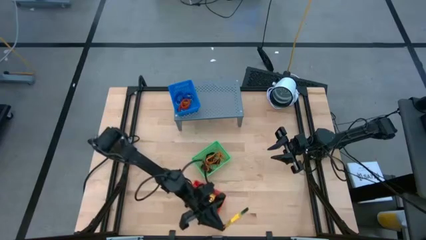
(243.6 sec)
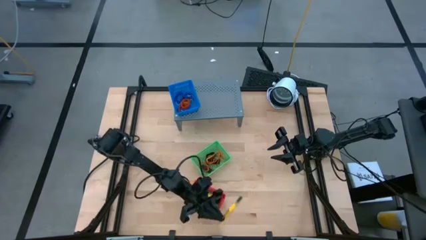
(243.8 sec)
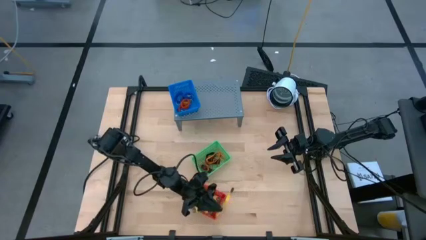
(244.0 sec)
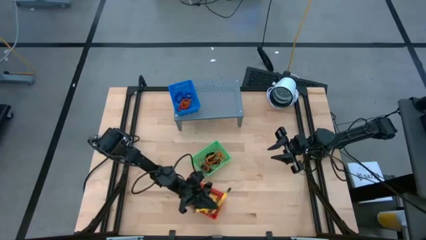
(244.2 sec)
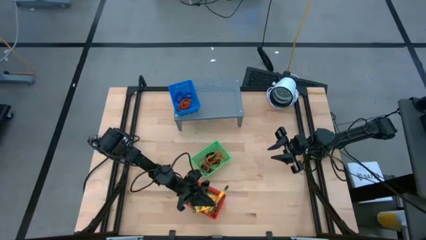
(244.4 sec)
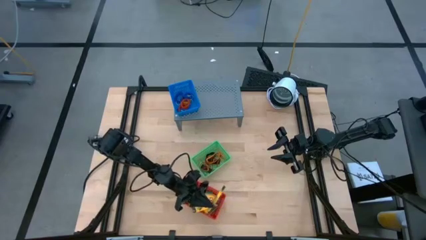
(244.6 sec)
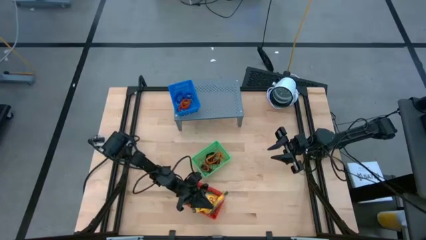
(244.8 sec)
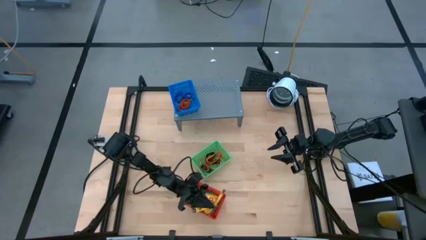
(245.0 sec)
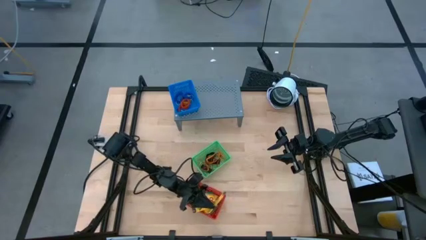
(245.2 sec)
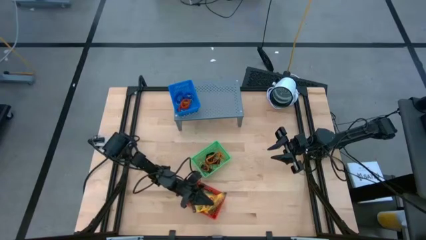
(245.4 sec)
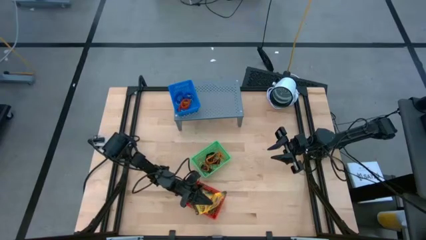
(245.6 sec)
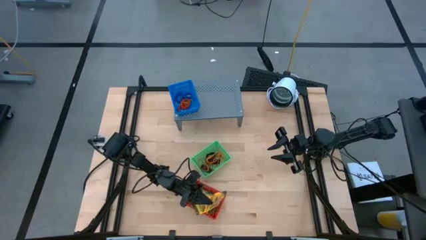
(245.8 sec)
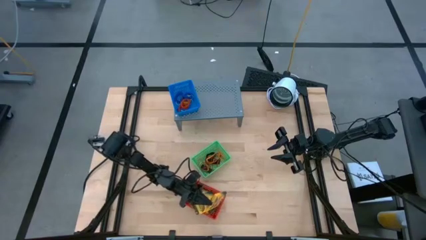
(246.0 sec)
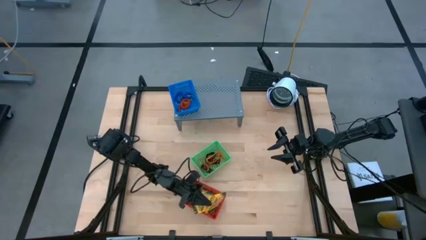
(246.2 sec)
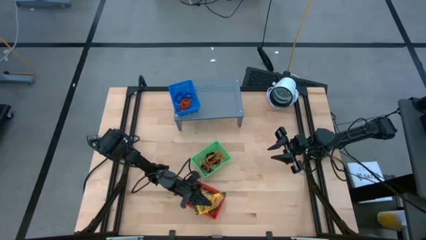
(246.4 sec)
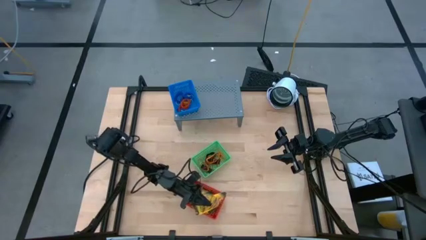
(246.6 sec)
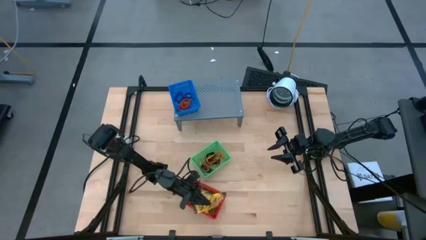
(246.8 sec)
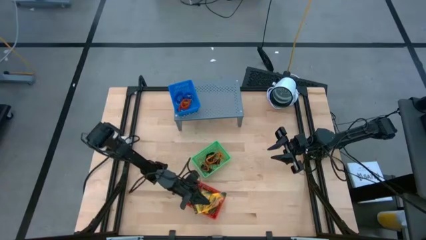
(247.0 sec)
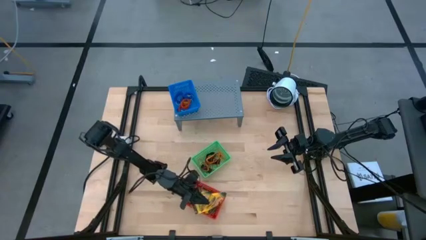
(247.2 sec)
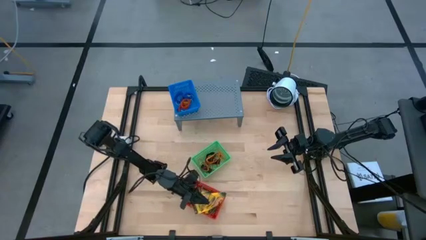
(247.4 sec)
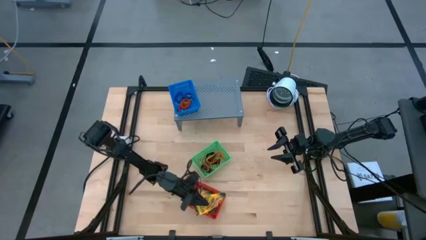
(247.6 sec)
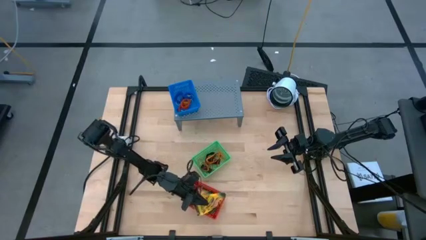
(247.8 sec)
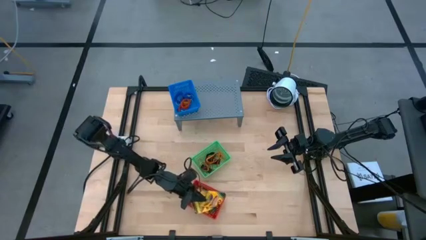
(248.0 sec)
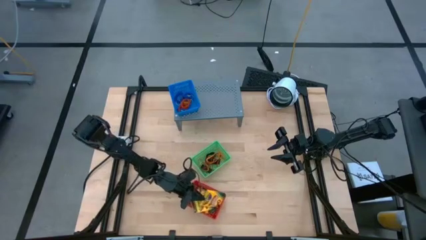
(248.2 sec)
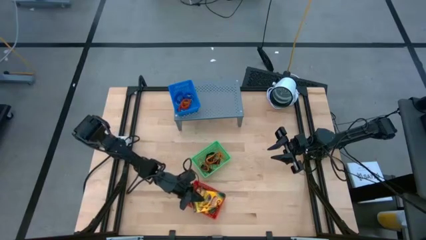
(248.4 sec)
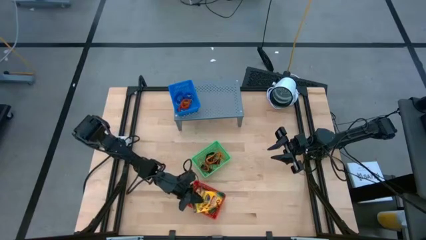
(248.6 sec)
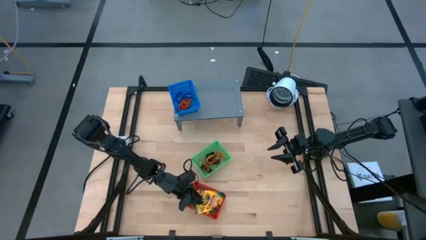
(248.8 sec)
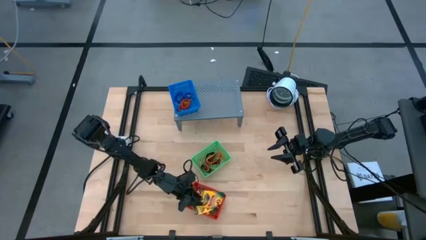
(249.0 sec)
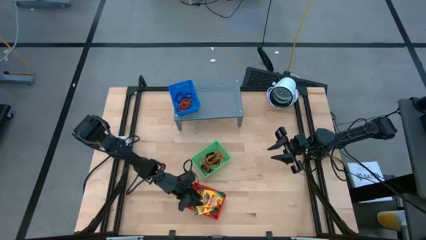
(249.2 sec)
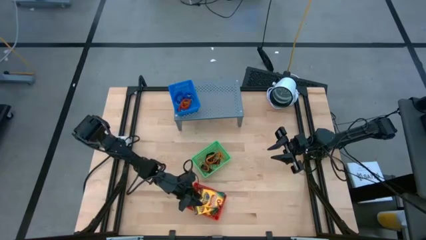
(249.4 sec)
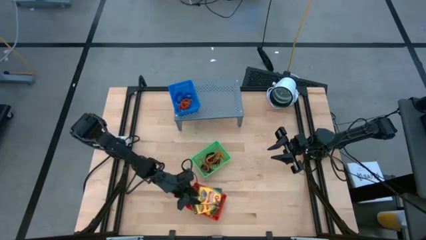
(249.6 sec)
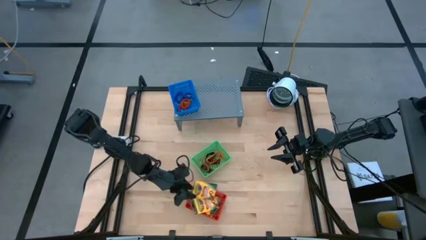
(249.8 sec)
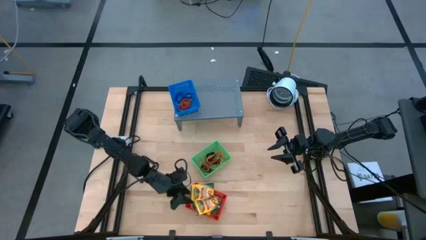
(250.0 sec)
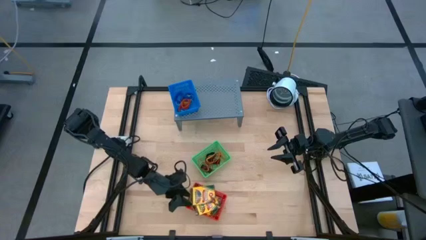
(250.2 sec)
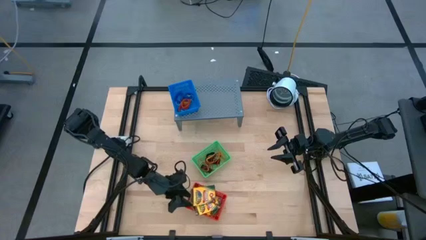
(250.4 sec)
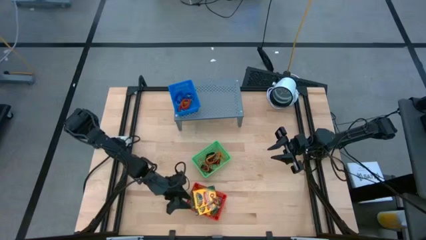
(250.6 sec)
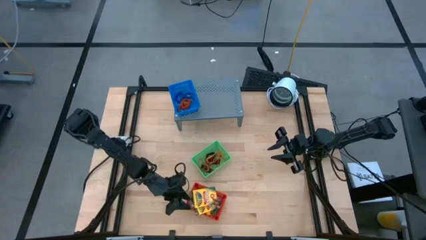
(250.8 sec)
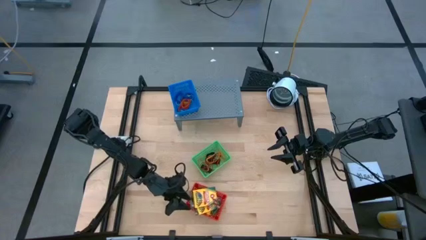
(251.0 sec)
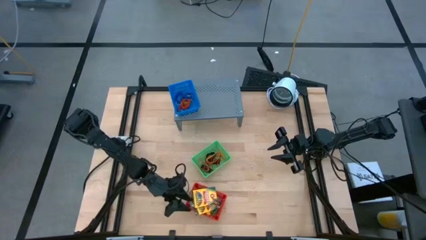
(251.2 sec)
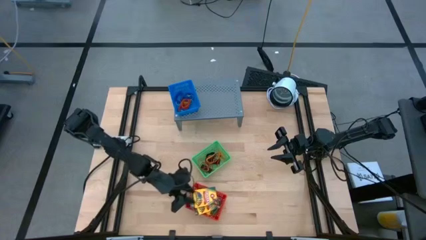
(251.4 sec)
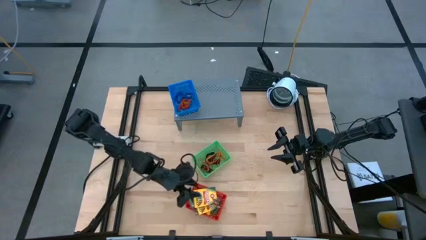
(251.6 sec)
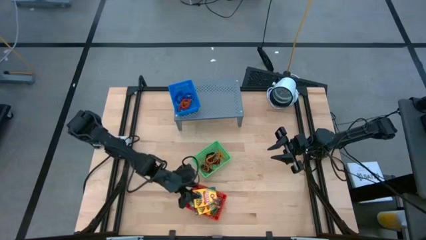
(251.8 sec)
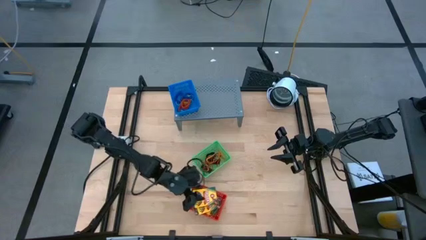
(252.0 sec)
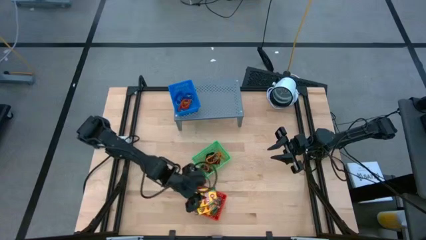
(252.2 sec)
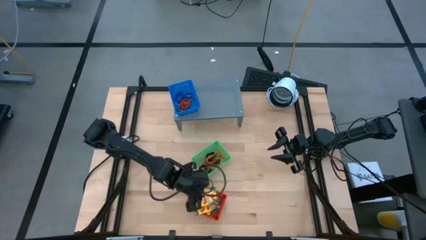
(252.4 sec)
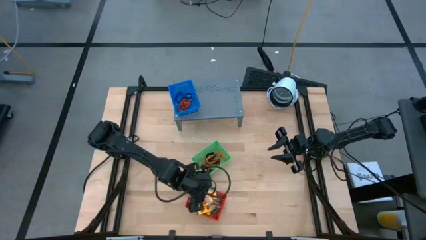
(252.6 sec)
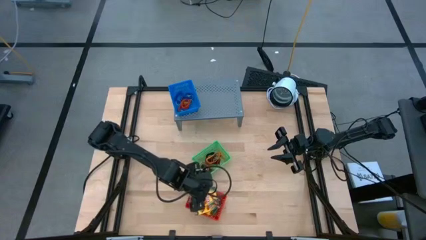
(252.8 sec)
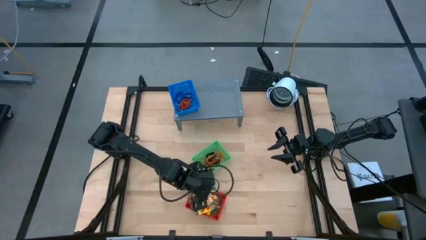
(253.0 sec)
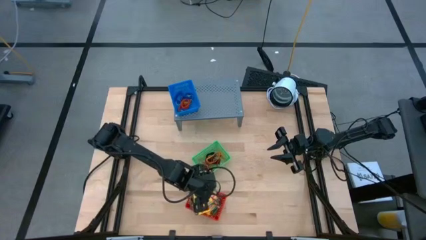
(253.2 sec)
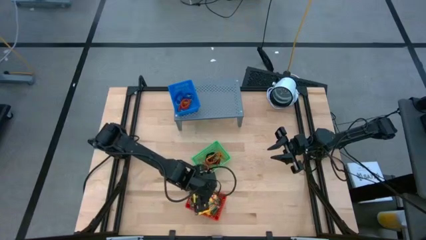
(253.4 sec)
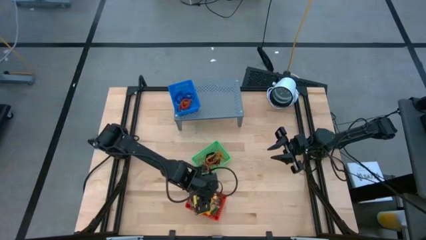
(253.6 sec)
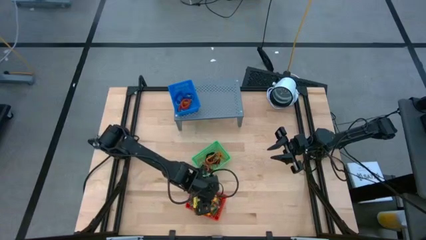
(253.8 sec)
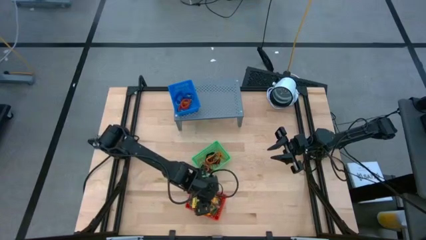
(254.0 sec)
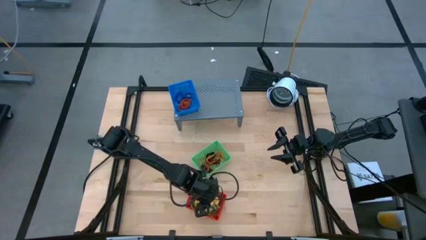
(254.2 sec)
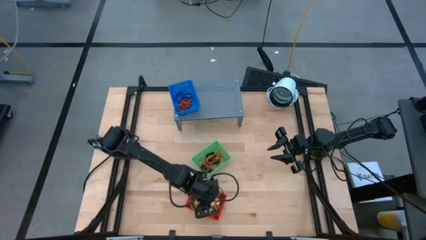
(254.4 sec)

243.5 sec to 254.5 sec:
Task: Pick & Place Office Desk Supplies
Put the yellow crayon box into the red basket

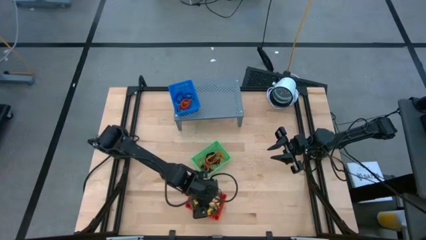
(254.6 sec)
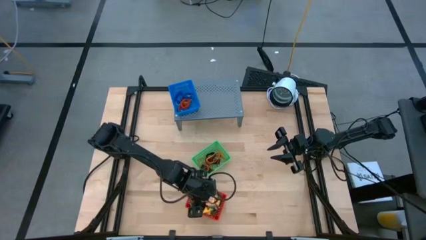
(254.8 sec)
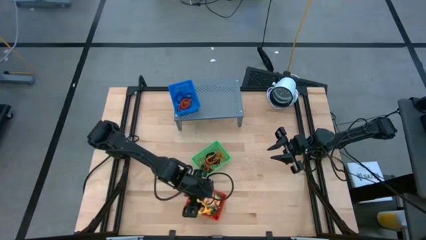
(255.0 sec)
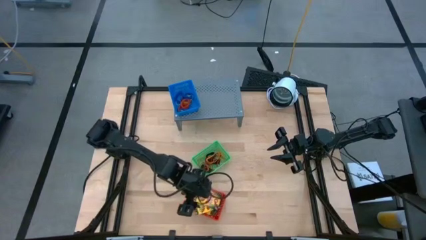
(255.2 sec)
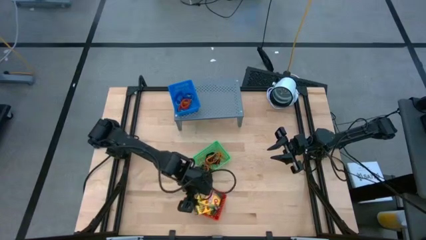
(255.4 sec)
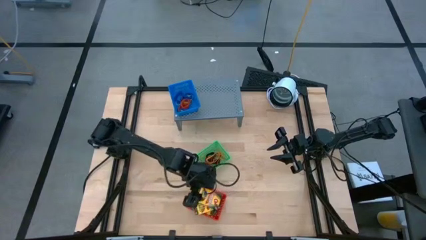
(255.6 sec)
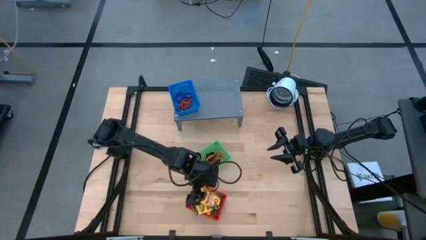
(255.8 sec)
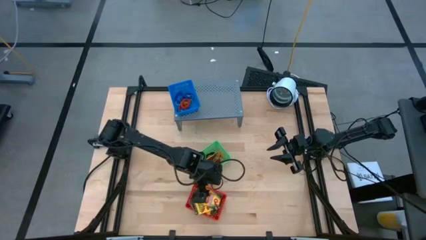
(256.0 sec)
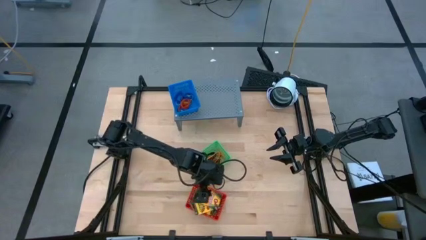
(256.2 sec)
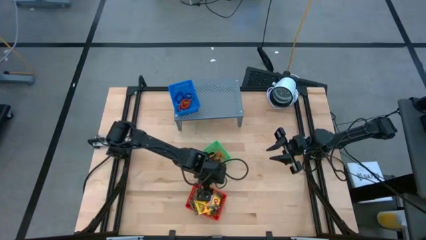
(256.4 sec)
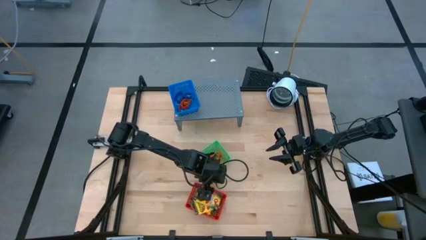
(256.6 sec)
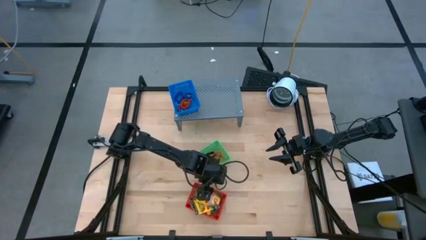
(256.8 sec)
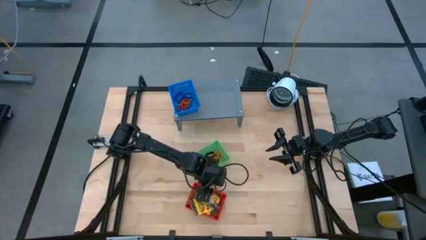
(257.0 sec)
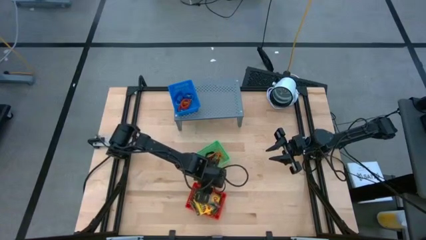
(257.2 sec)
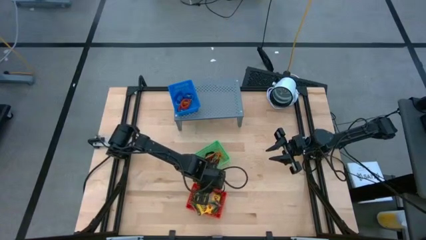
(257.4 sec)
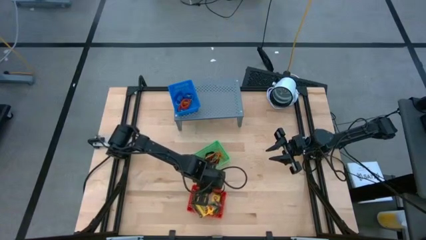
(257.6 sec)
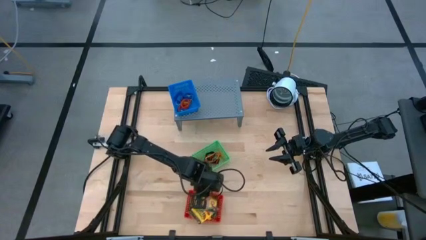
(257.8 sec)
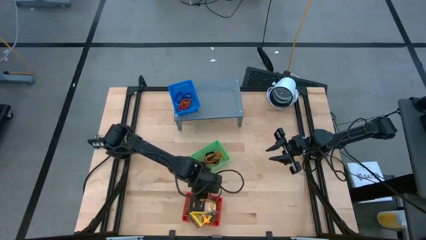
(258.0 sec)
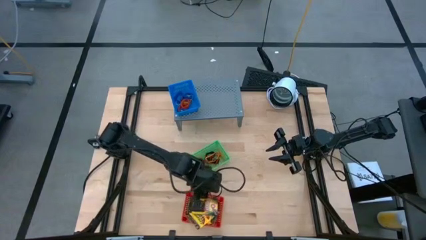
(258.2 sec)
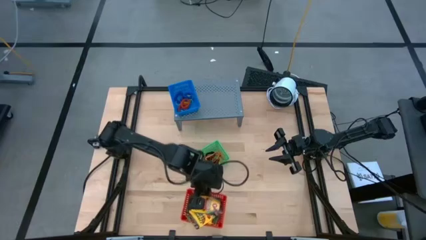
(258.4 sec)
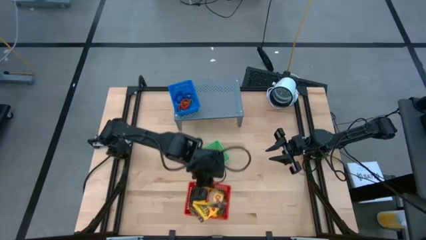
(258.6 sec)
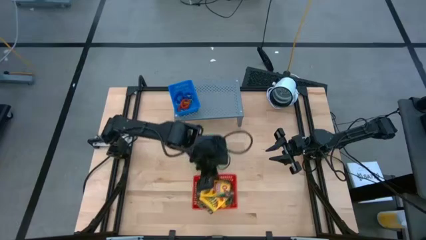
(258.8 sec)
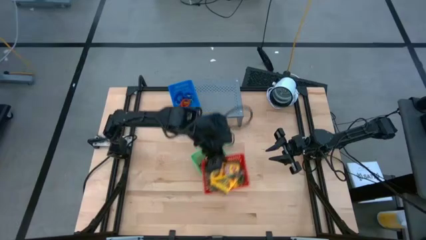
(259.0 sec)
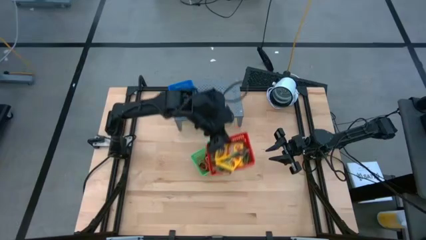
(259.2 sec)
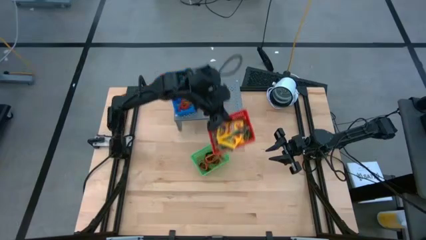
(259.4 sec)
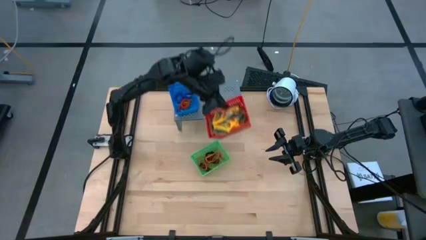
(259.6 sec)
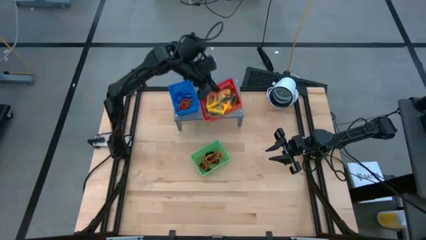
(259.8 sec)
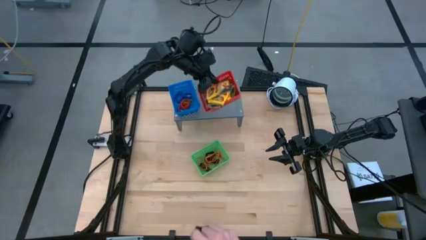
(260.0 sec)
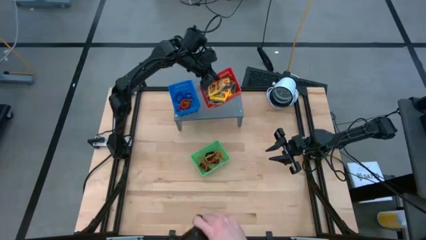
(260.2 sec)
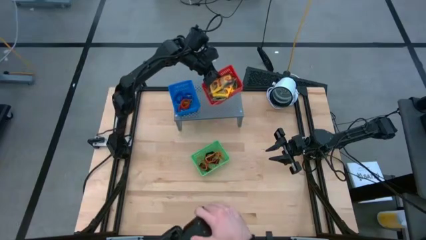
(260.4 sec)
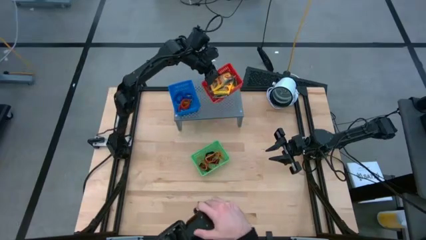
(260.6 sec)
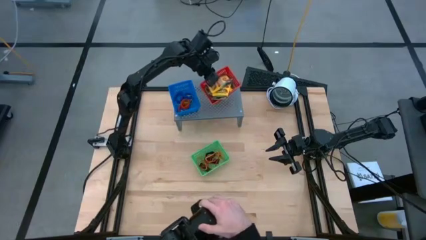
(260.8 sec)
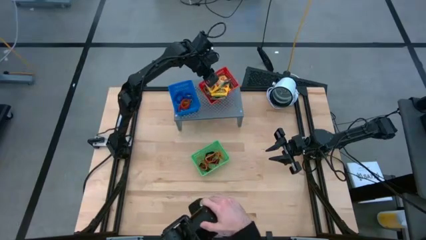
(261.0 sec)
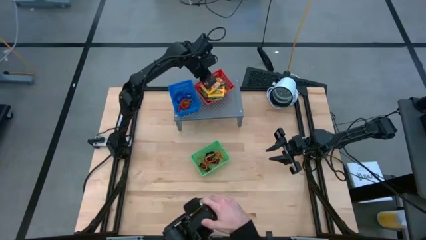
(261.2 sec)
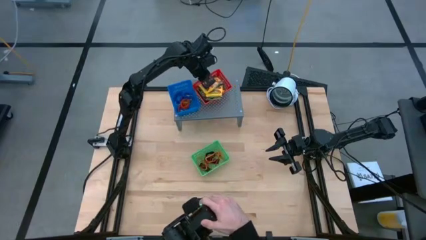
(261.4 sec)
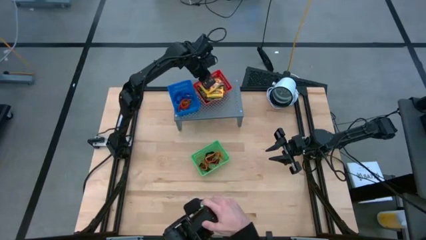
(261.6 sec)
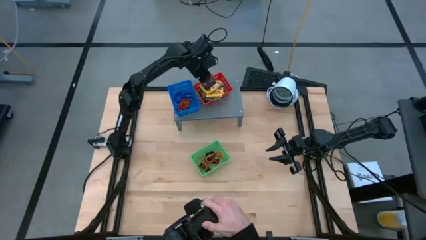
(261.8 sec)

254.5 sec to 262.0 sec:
Put the red basket on the shelf
